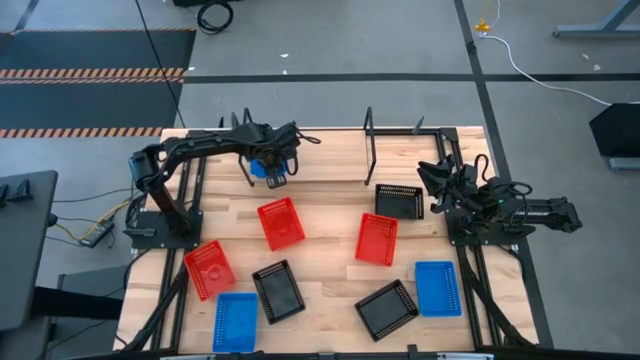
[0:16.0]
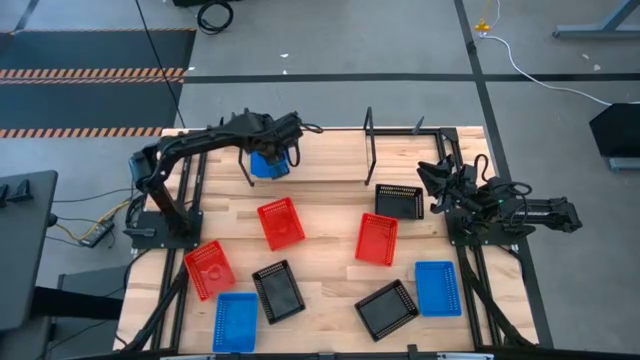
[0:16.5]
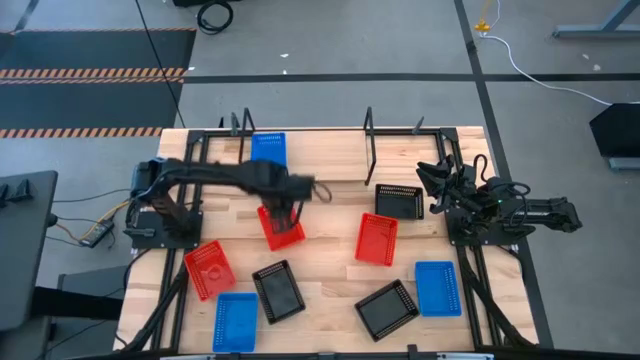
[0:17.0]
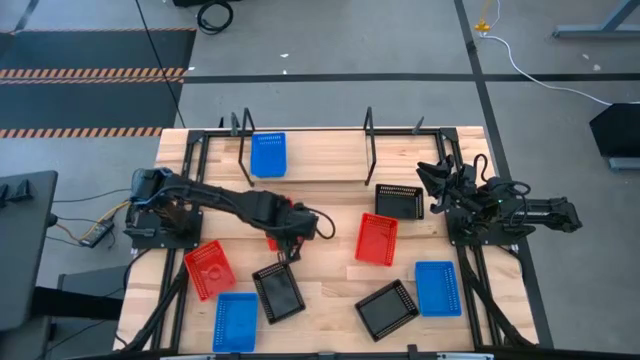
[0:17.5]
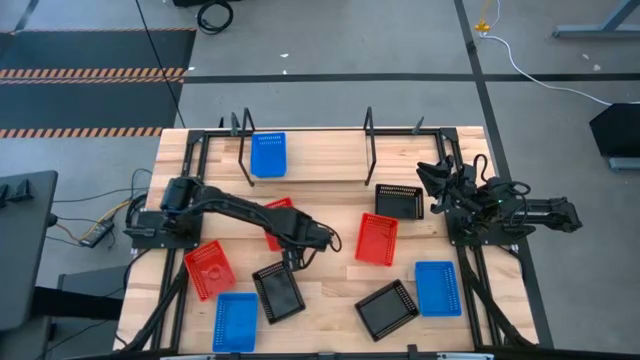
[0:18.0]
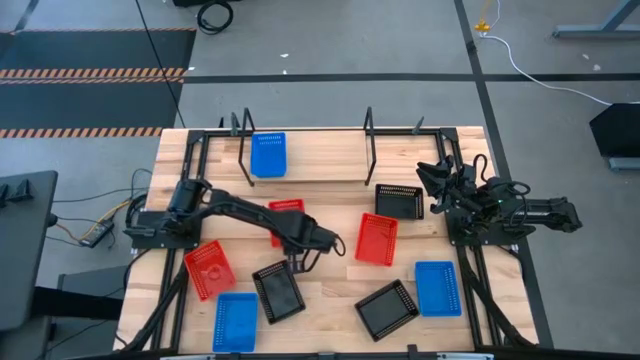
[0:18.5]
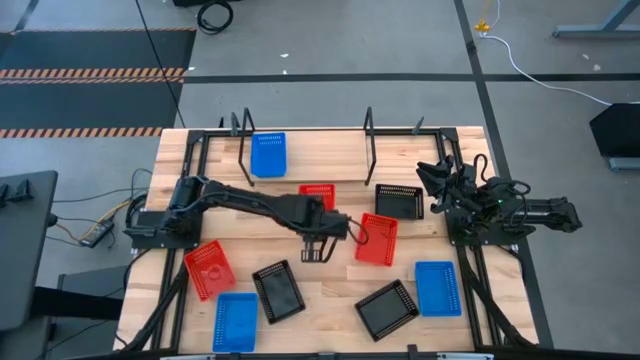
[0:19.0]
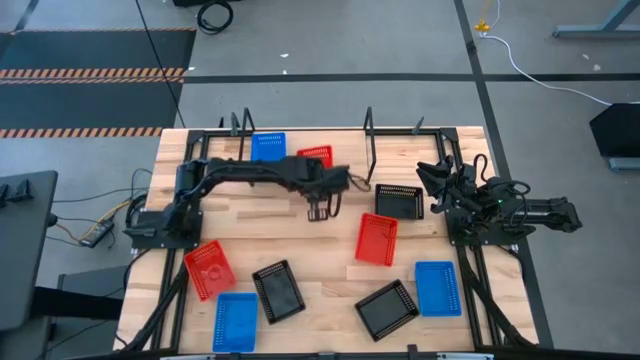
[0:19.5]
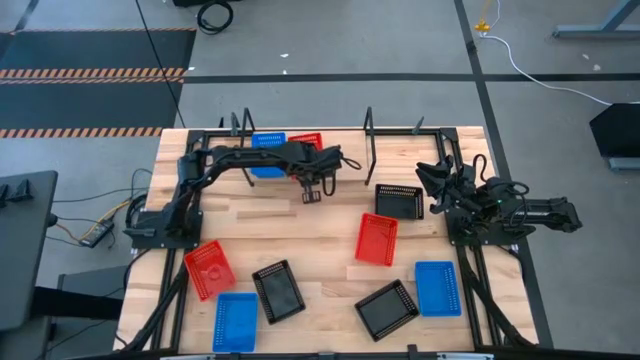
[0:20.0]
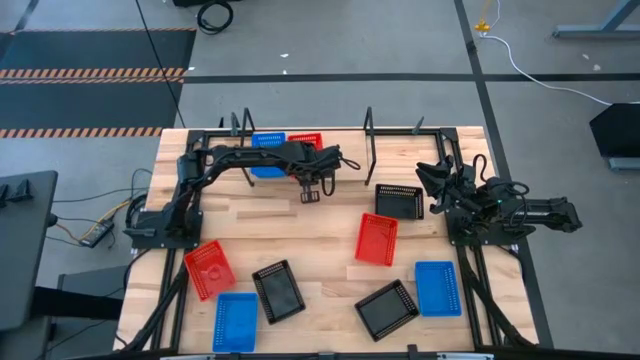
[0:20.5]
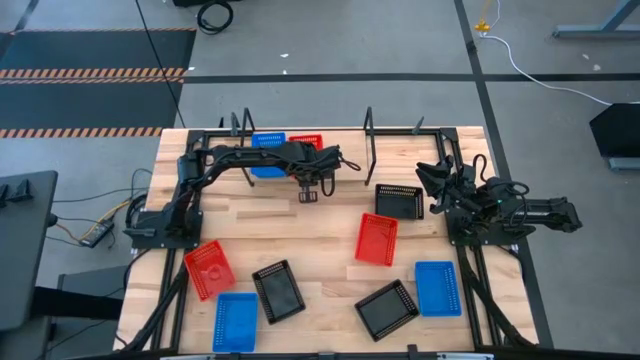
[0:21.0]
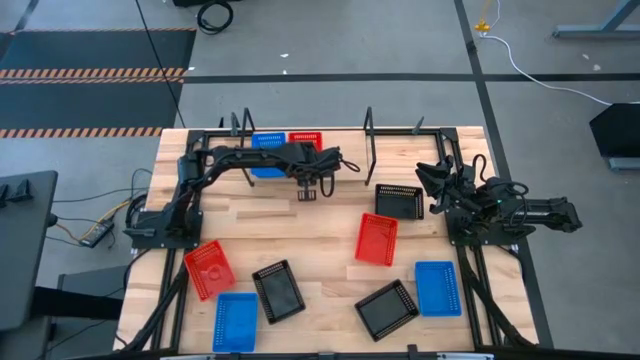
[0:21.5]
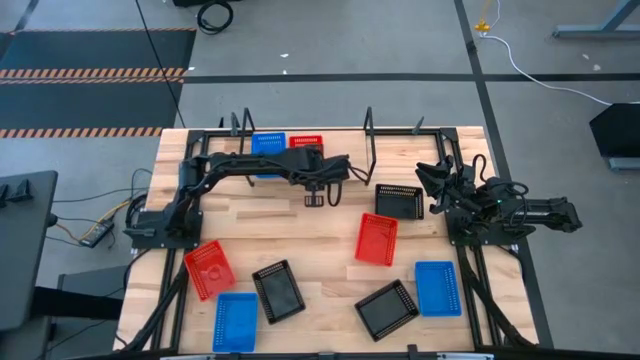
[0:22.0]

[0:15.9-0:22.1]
Task: Stack baskets on shelf by color
Put the top red basket on the shelf

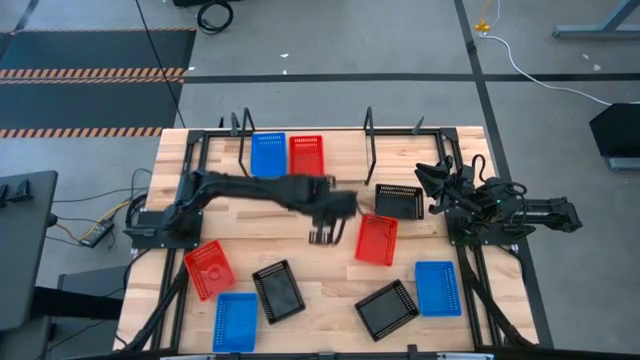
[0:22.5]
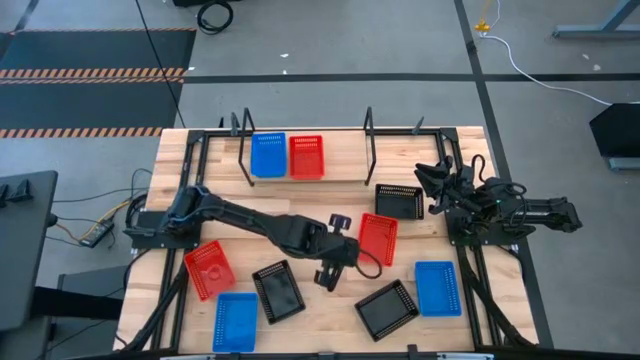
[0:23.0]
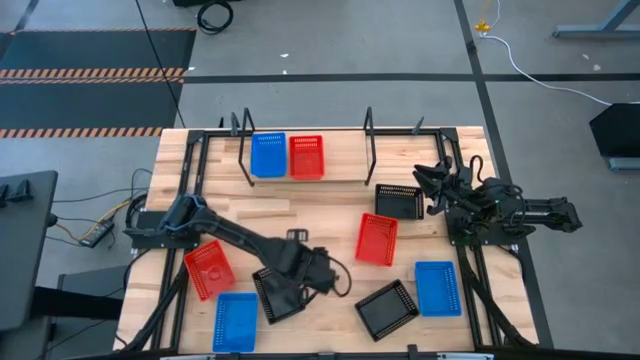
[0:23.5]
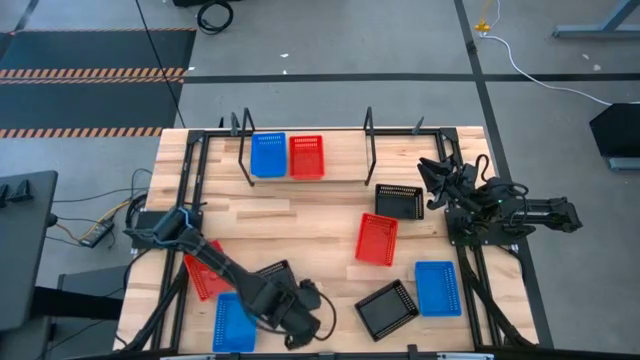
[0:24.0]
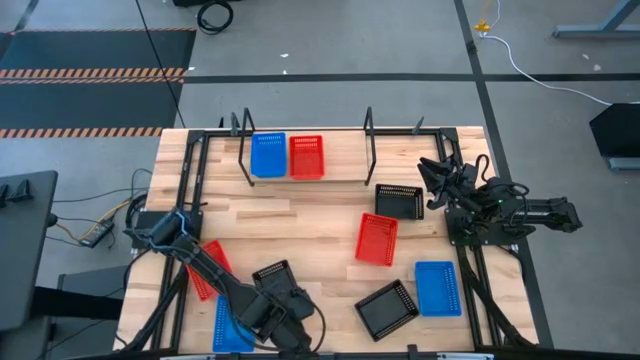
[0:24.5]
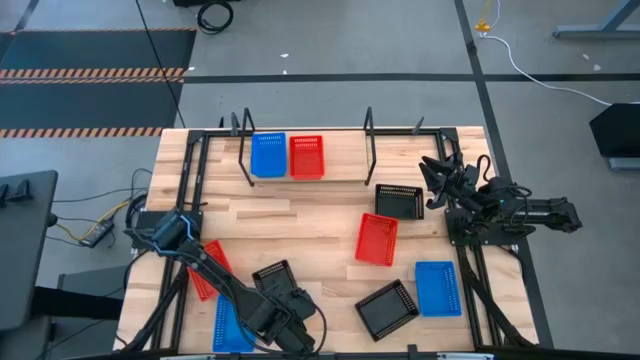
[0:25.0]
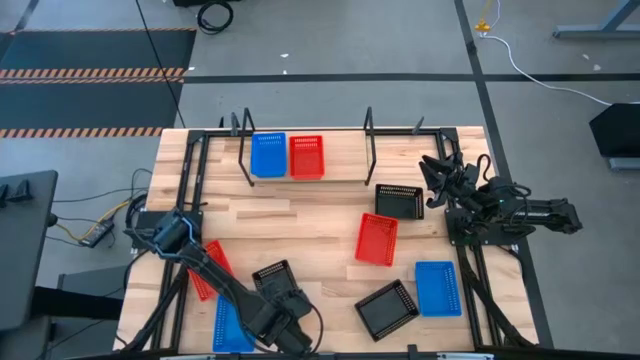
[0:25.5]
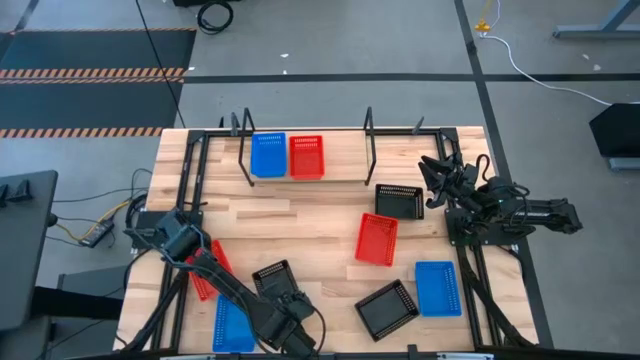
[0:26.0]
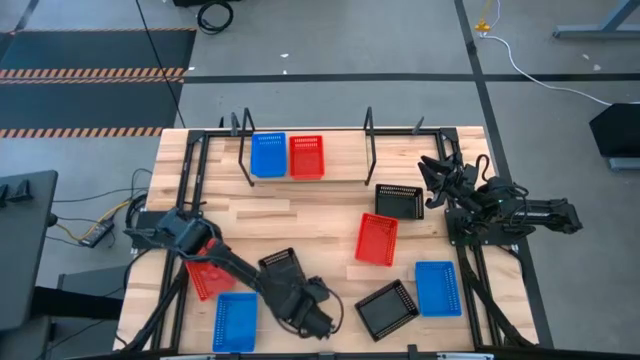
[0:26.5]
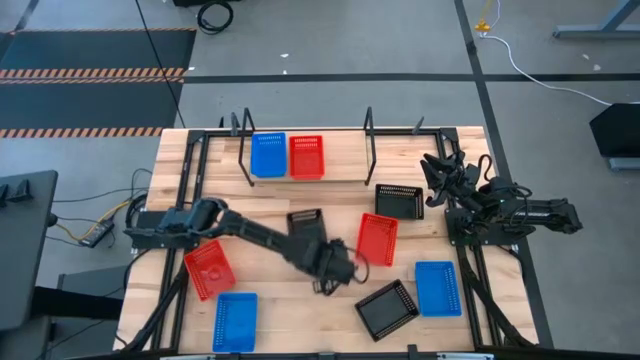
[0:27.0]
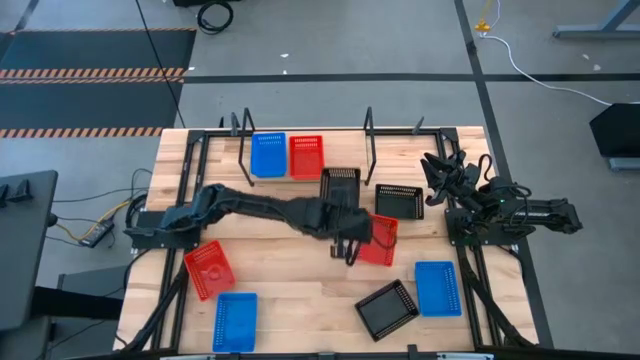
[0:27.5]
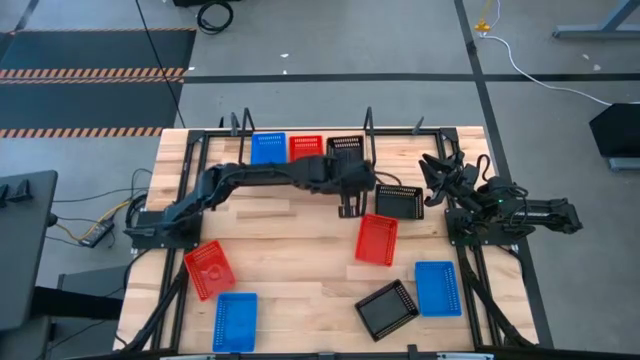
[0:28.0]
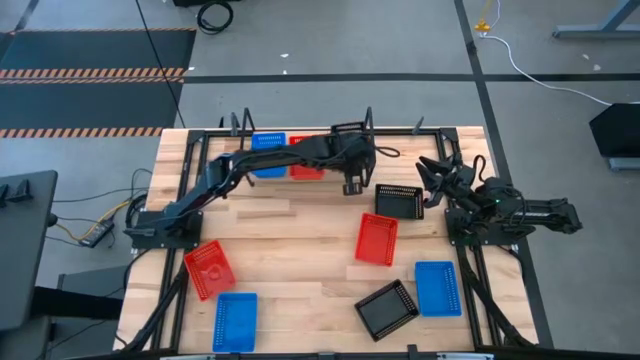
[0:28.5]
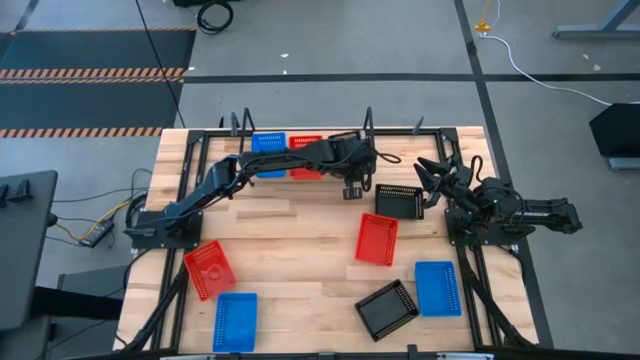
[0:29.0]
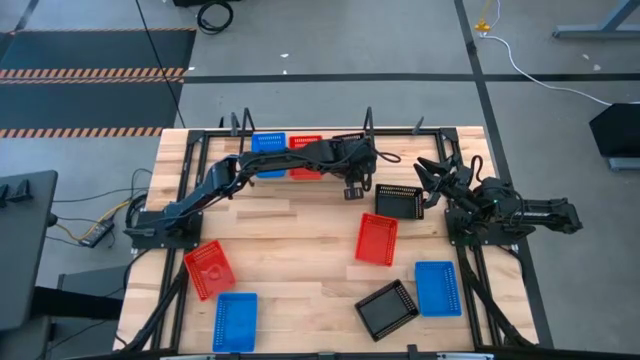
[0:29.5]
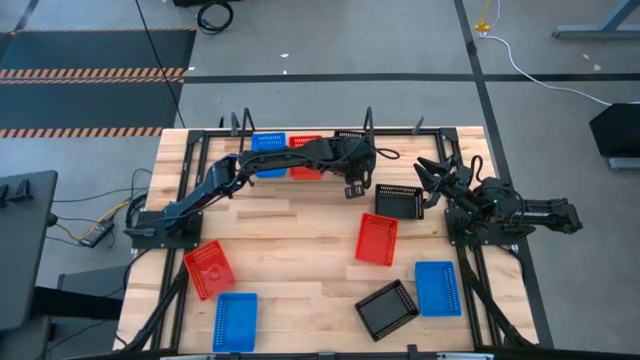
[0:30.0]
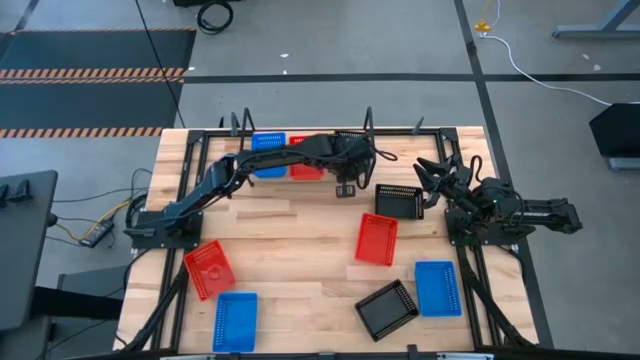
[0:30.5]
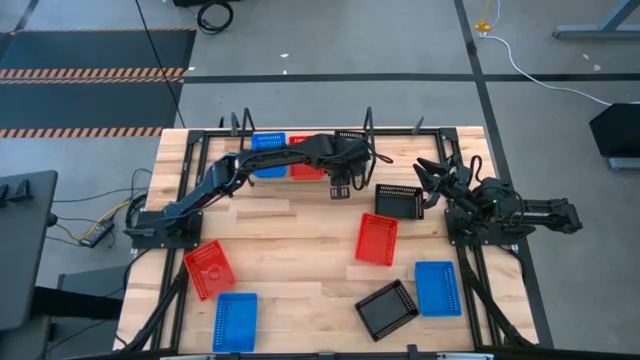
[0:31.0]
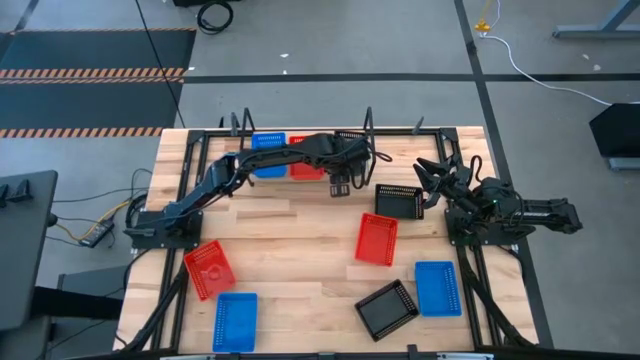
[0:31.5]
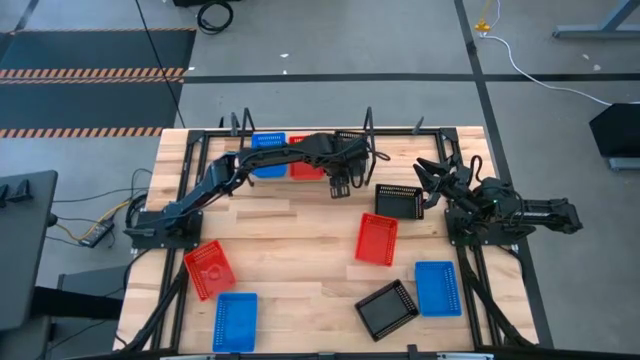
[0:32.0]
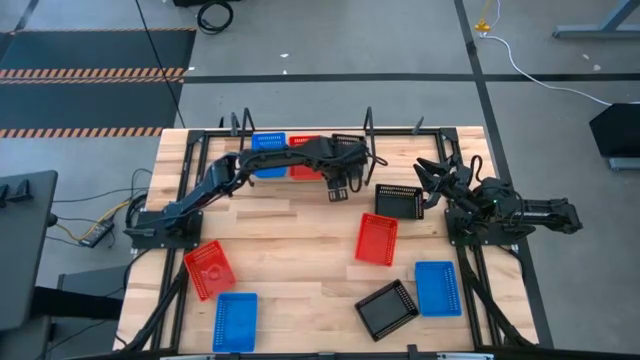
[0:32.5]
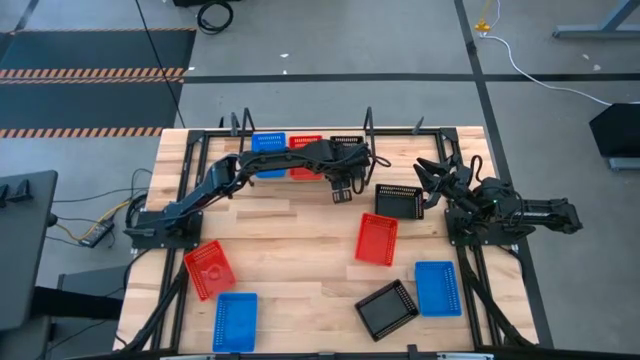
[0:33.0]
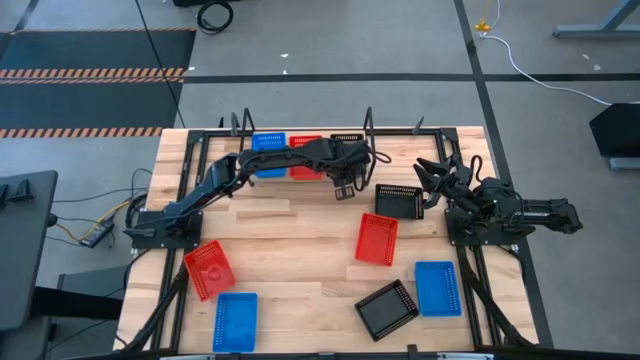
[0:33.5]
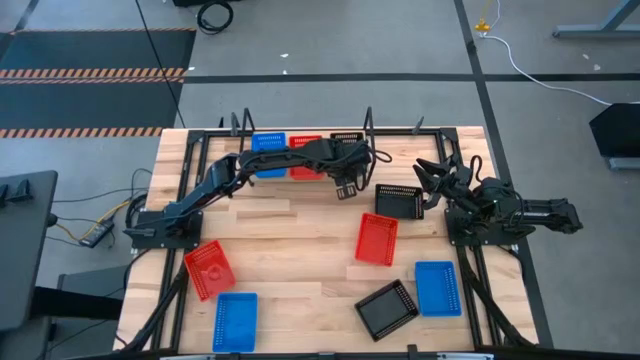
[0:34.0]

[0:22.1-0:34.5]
Put the left black basket on the shelf

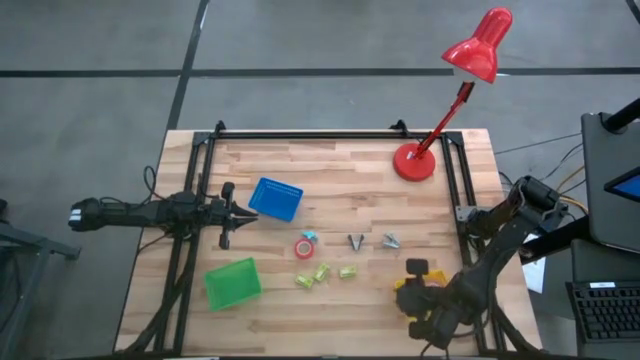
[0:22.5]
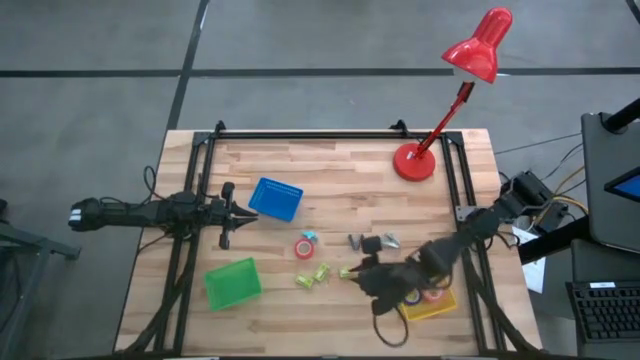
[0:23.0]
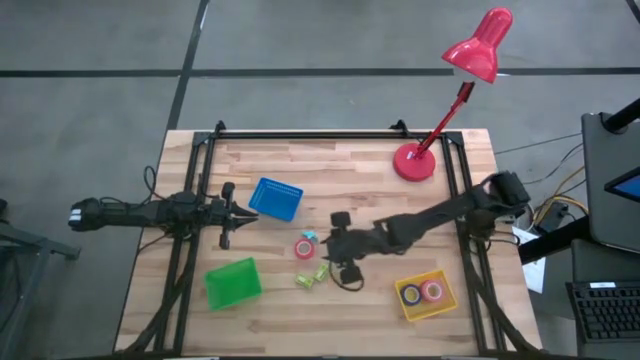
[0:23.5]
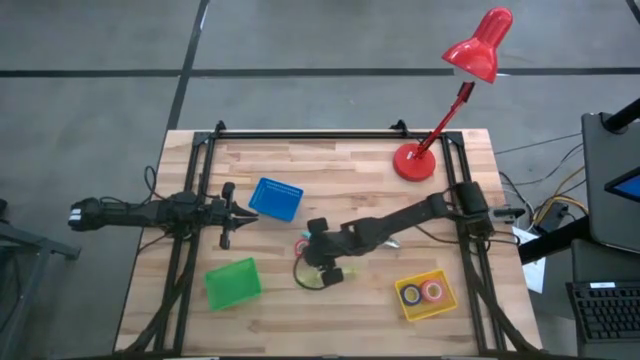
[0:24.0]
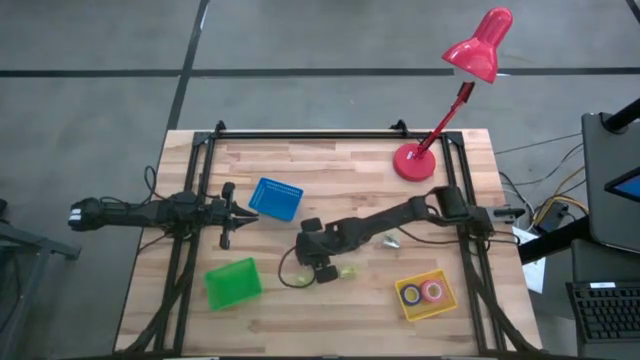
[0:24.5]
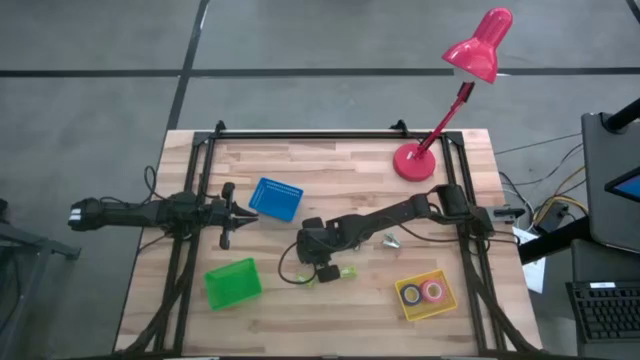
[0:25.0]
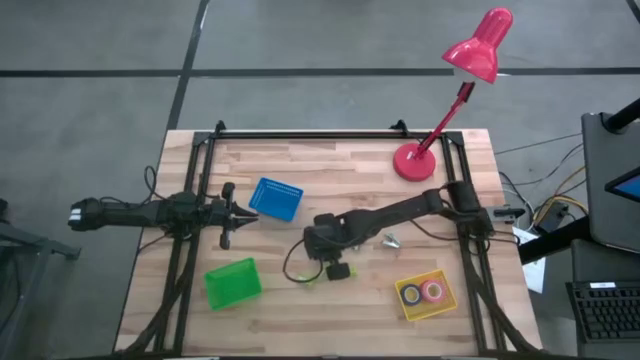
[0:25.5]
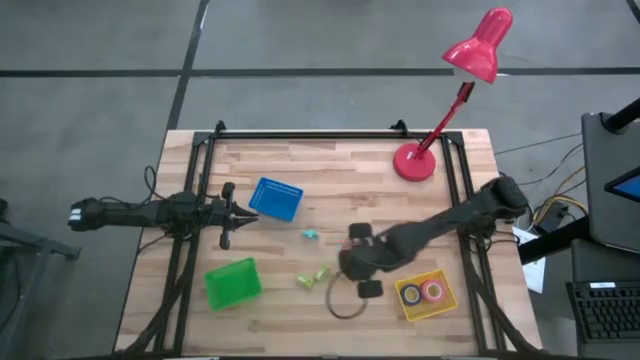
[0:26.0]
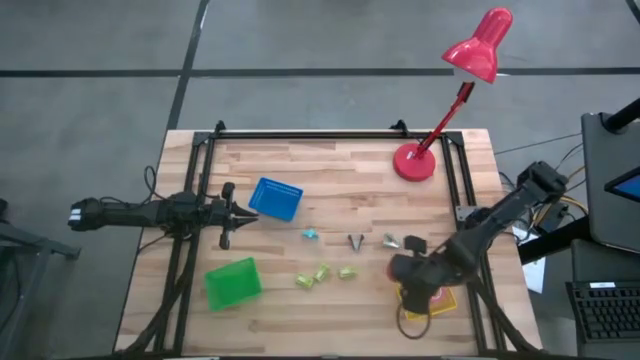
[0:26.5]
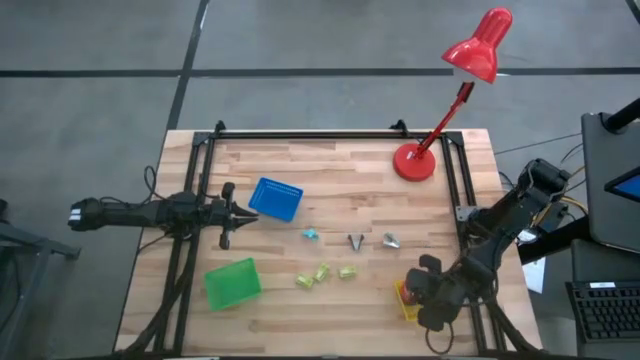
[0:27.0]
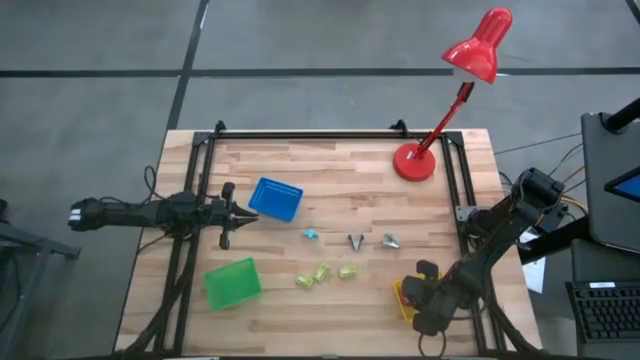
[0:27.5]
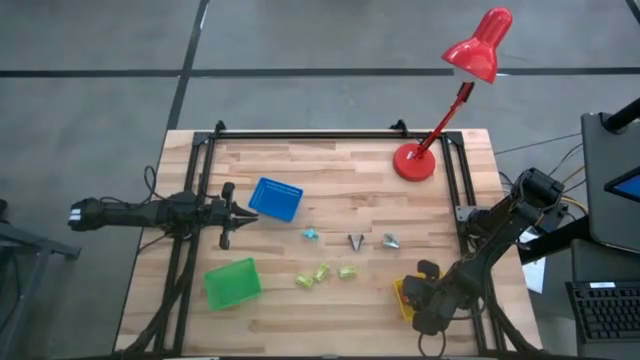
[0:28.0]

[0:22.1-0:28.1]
Task: Pick and place Stapler, Stapler remover, tape
Put the red tape into the yellow bin
